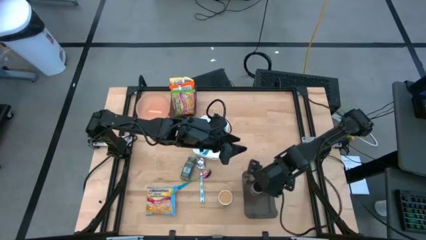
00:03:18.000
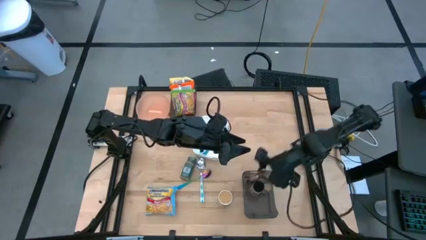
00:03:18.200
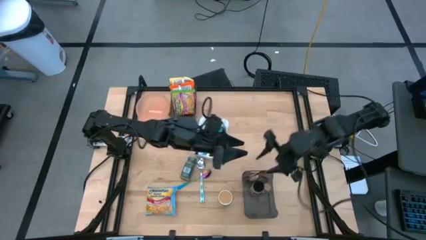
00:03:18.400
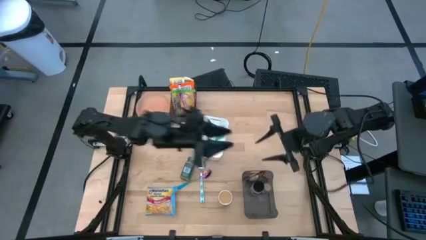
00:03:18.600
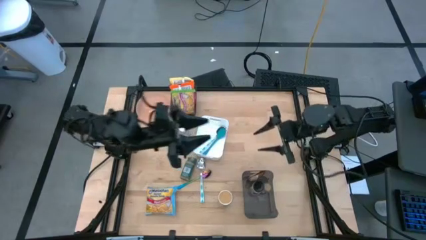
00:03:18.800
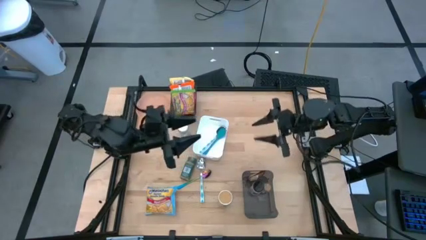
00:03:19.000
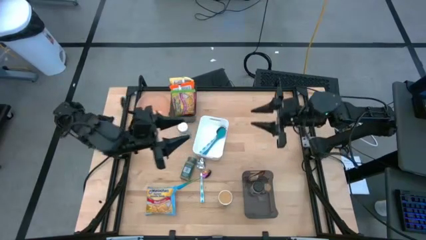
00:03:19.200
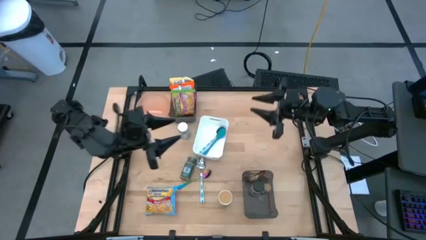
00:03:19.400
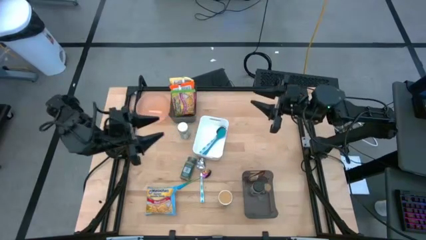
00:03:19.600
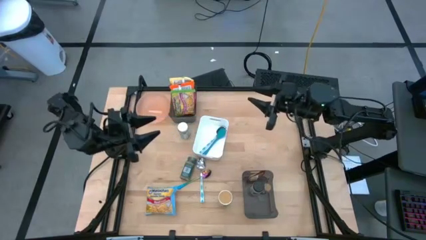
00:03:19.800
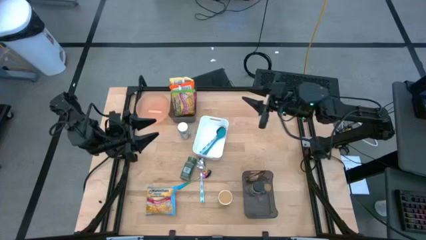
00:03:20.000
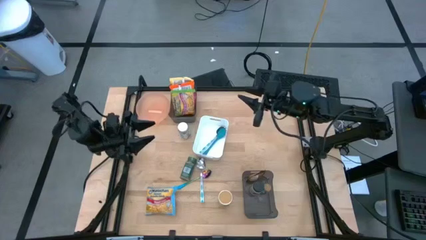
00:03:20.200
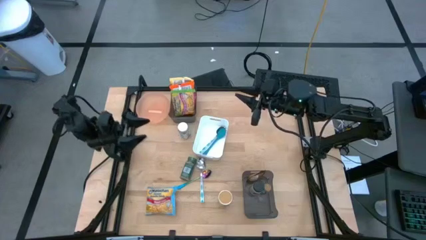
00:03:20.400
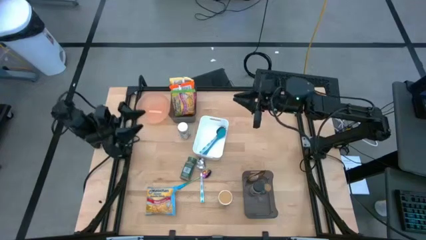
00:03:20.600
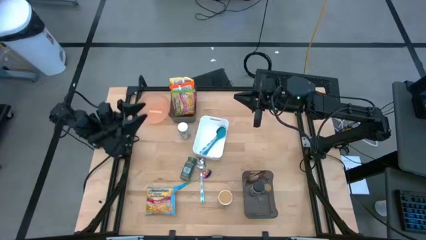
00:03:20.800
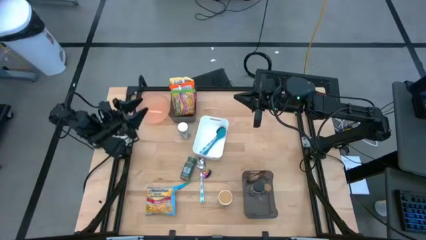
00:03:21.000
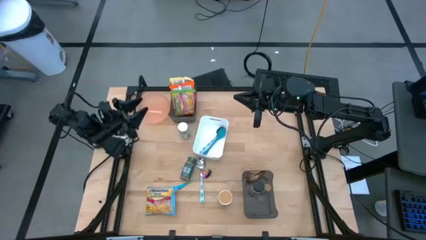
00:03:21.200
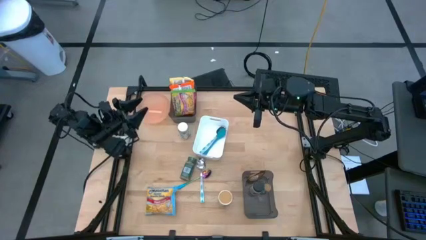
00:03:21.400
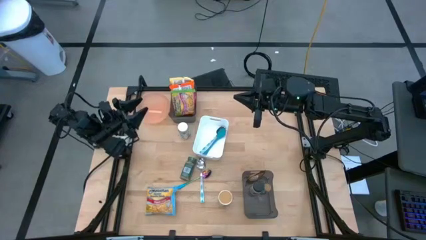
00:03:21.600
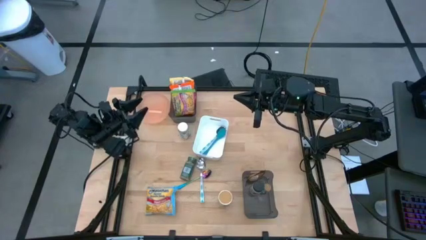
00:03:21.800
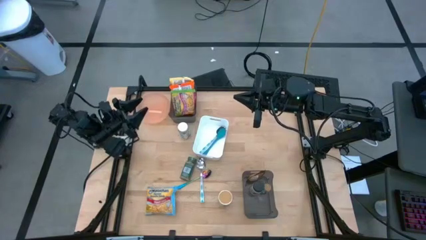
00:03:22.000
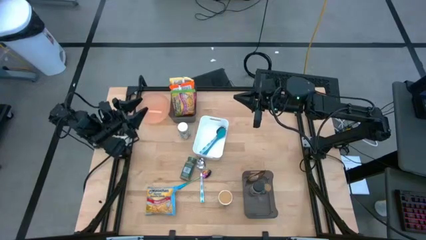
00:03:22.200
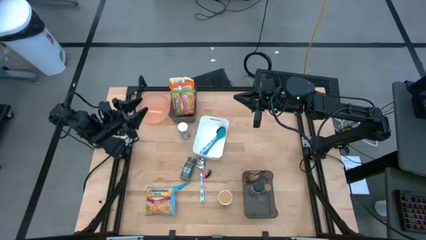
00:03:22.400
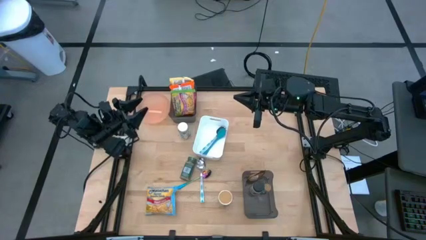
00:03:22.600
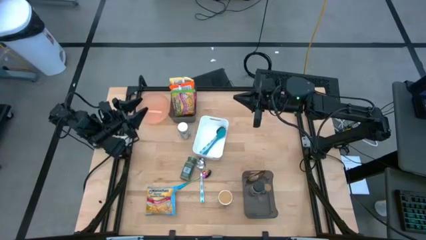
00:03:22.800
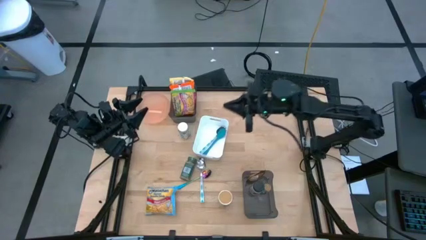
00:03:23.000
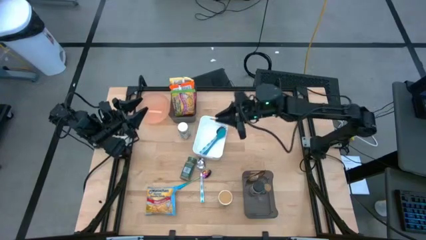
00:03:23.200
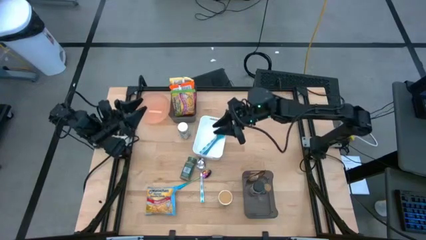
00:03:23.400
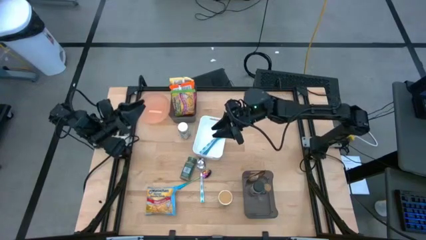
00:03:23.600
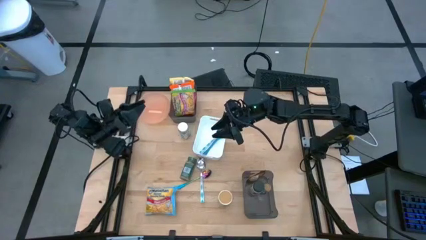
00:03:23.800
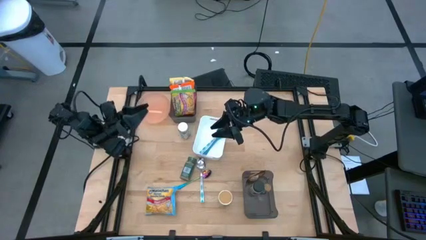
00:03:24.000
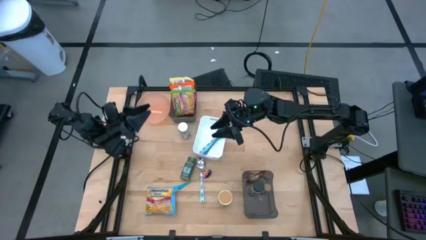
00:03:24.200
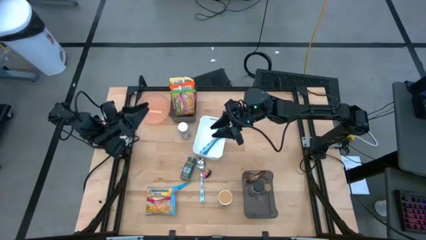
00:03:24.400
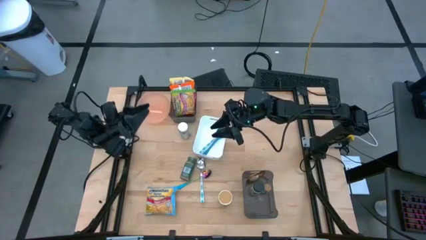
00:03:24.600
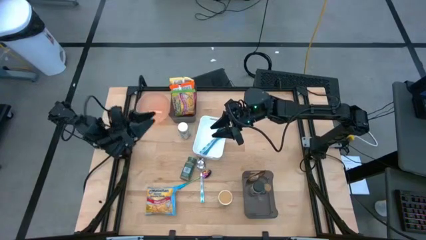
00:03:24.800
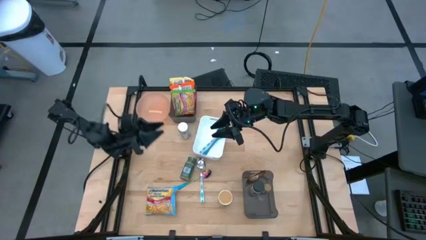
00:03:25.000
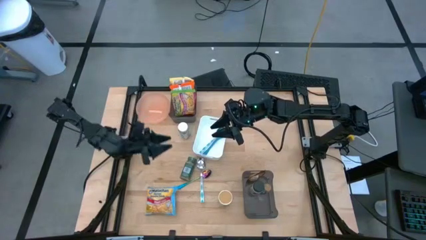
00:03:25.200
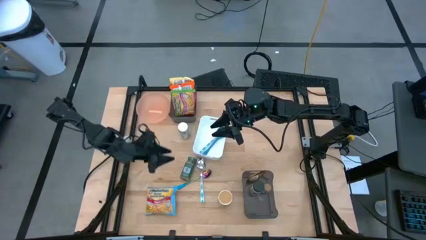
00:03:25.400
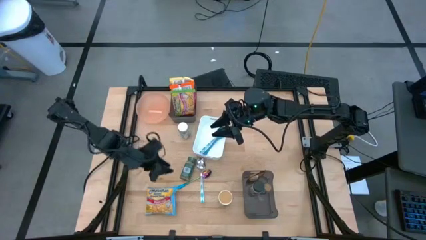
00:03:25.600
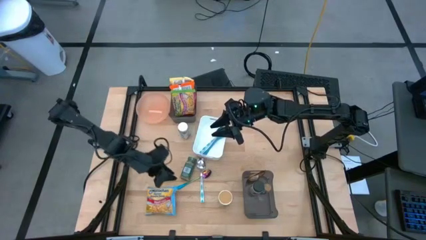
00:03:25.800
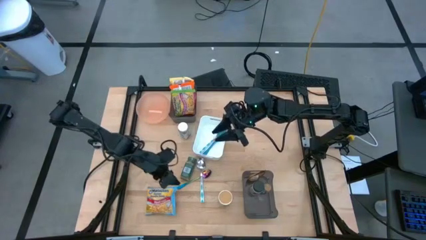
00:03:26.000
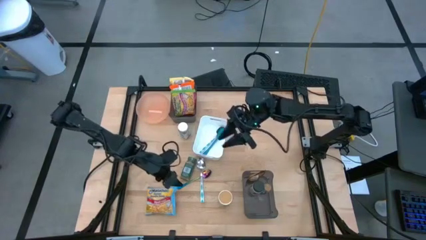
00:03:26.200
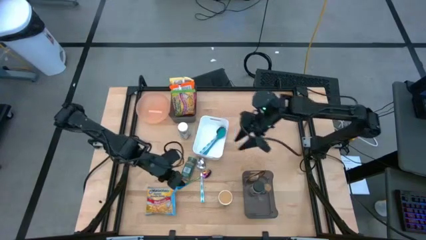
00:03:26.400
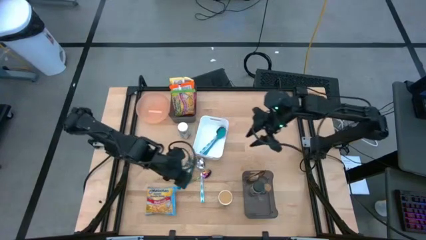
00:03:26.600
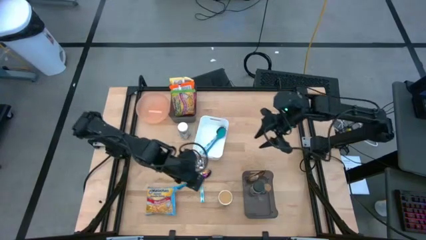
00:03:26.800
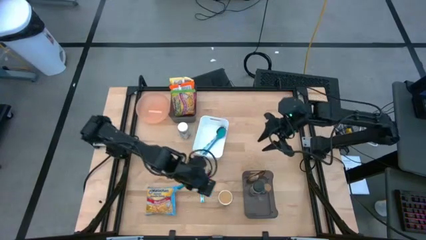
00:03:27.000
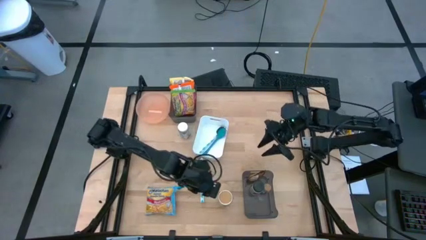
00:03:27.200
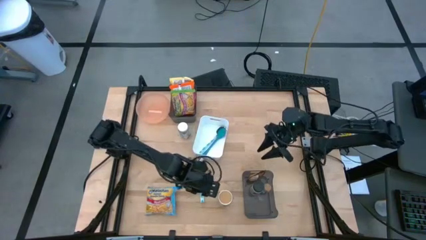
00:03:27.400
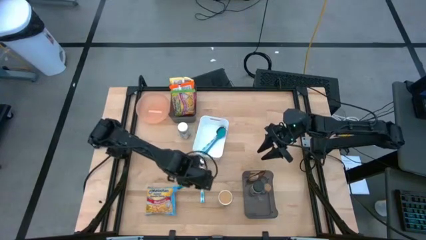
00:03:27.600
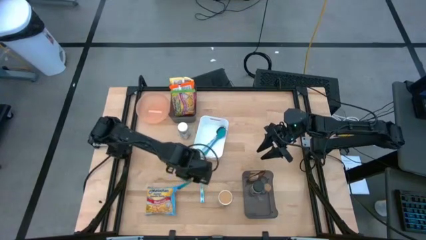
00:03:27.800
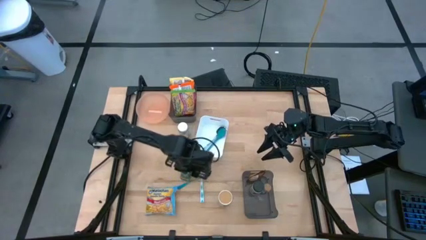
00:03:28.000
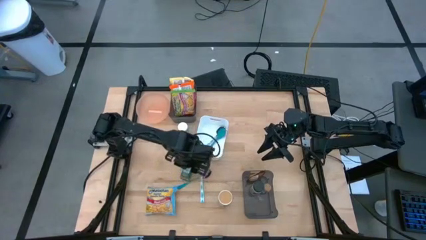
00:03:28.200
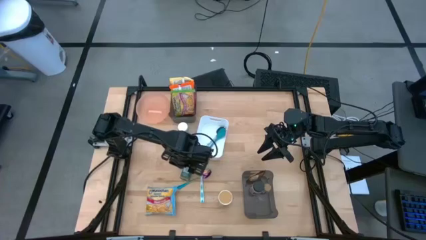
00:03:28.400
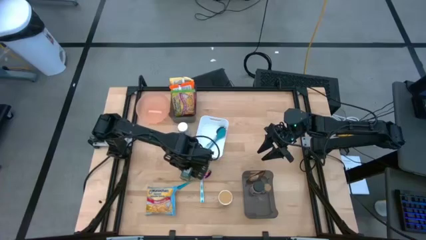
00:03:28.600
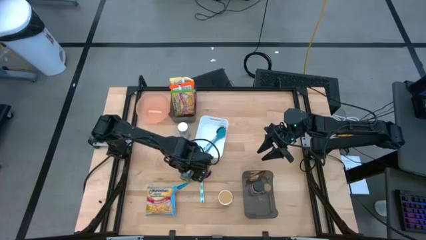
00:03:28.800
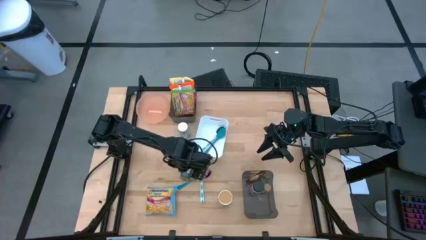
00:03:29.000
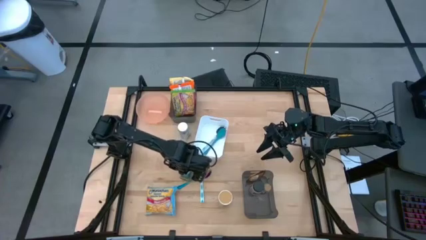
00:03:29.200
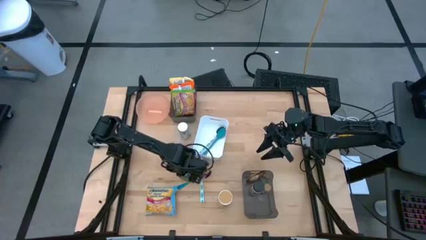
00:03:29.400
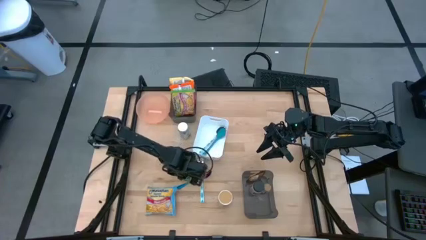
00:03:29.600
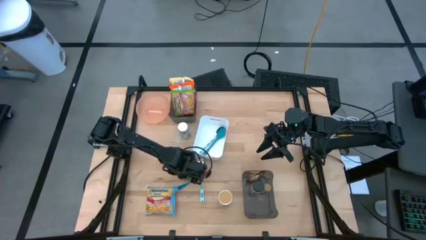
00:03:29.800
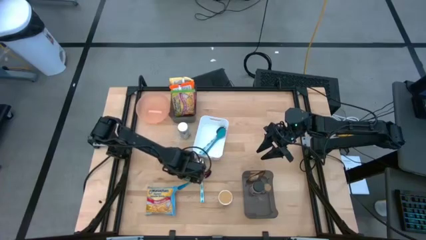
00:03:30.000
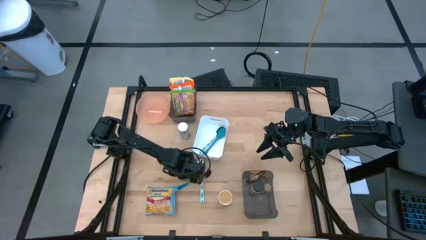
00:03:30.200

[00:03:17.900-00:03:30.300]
Task: Pick & Place Food Item
Put the green seasoning bottle into the bottom black bin

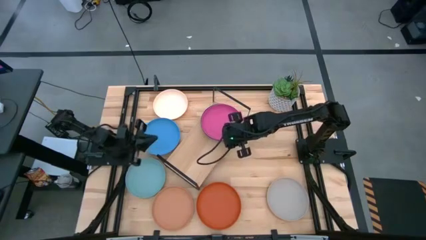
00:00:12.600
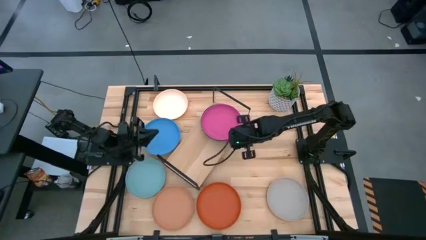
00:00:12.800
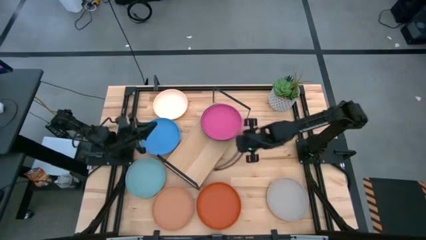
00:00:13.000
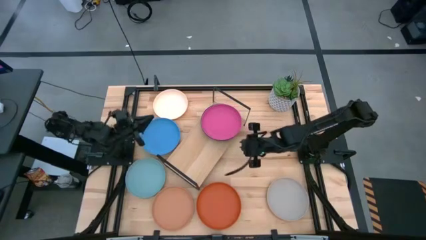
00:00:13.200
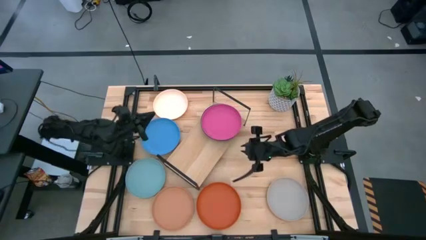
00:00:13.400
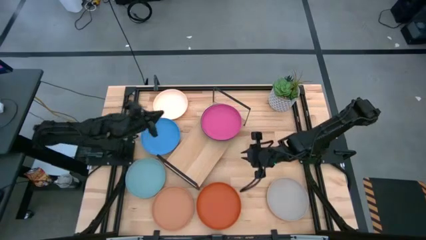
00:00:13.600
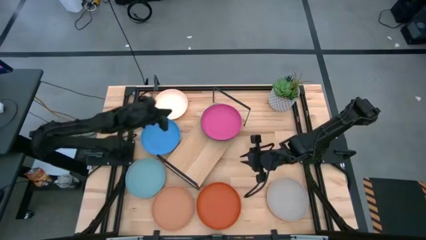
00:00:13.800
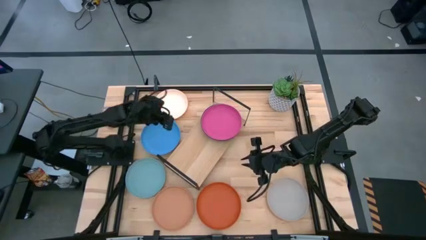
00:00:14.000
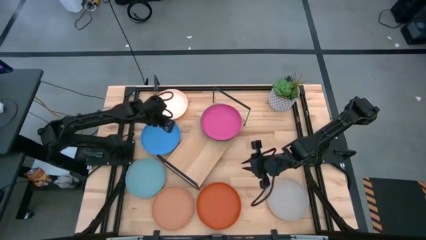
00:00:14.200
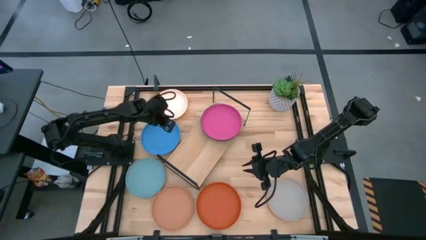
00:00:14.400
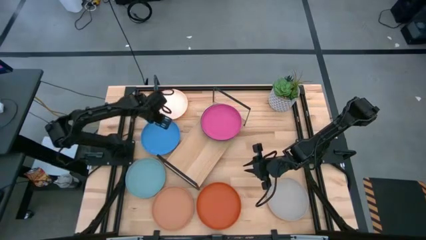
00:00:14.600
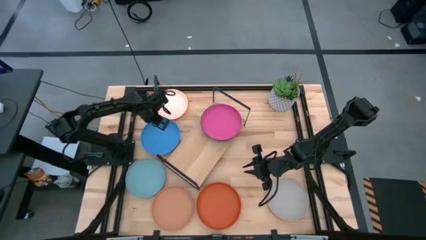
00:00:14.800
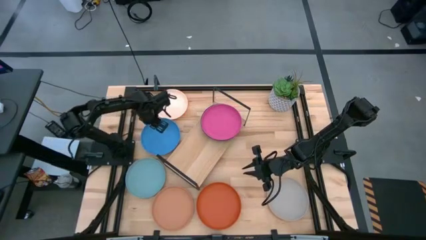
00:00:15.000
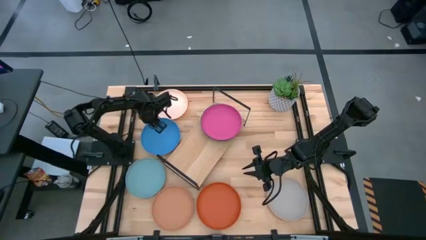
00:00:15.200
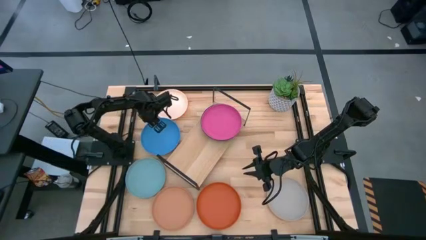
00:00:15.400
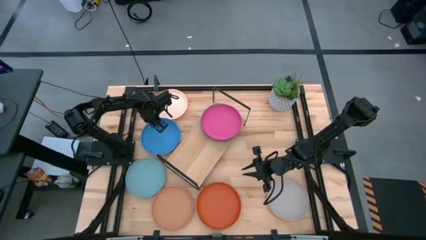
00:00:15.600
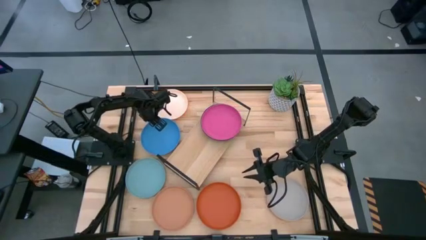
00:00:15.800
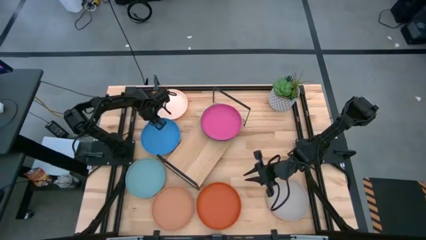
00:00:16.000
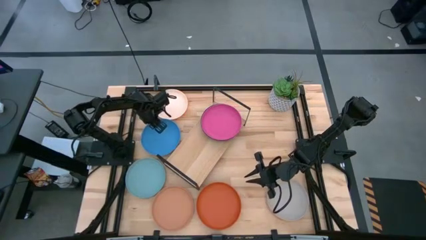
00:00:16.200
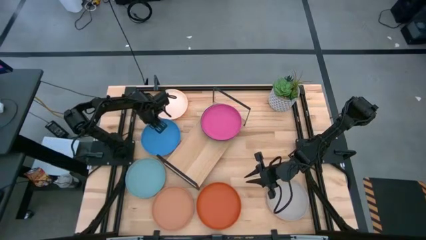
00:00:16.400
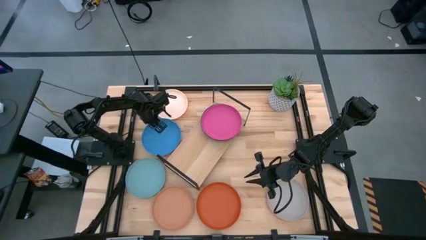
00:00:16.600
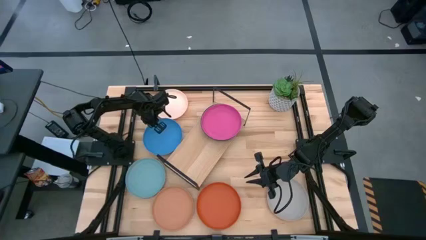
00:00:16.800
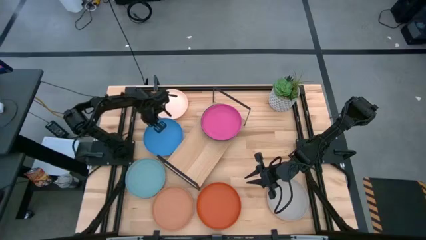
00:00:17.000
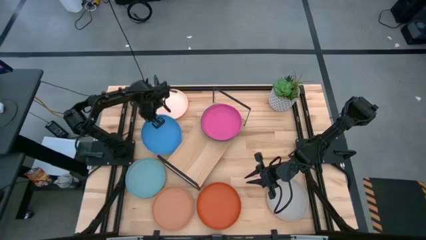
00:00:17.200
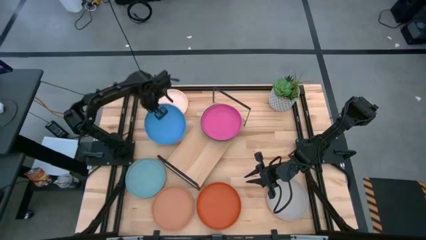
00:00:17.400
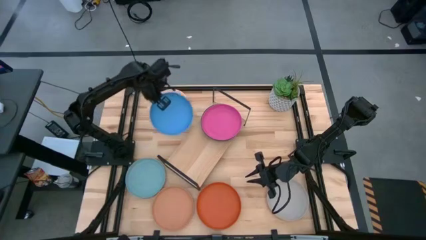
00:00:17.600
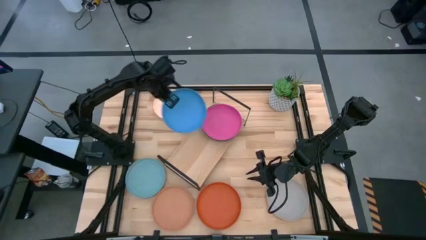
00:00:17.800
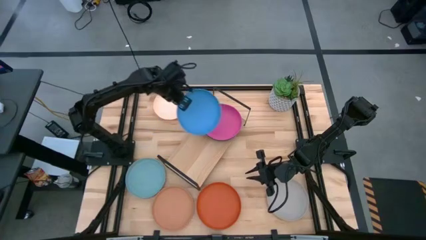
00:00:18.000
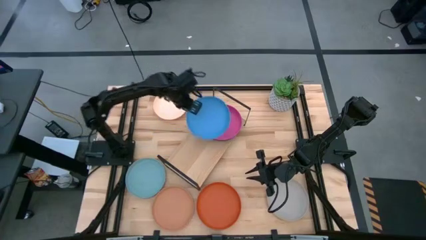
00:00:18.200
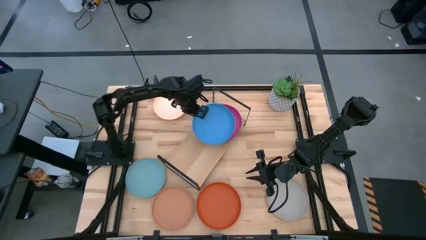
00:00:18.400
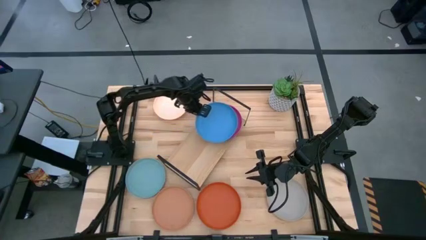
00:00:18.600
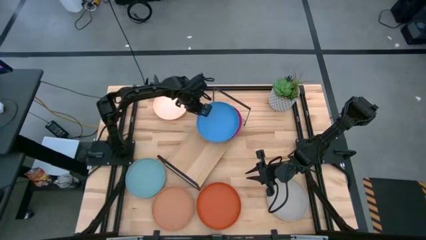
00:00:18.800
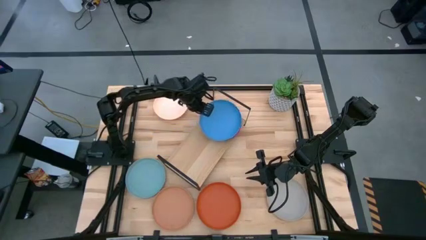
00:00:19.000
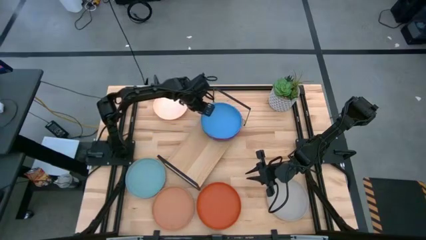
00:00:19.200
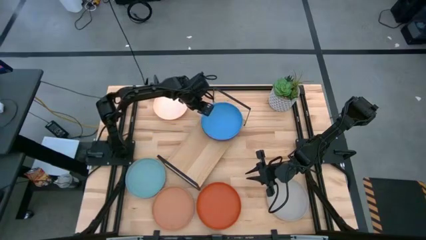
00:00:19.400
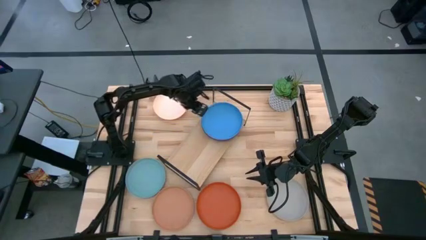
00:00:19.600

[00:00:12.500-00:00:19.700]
Task: Place and stack plates onto a shelf
Stack the blue plate on top of the pink plate on the shelf
